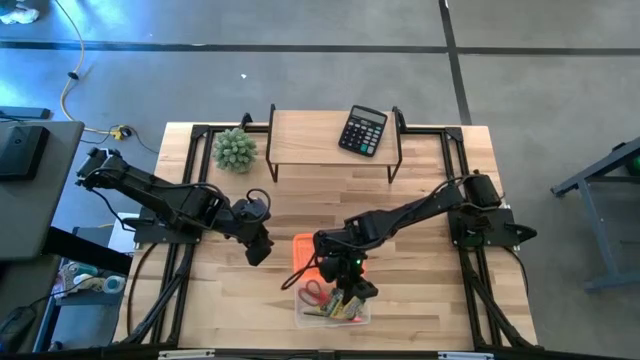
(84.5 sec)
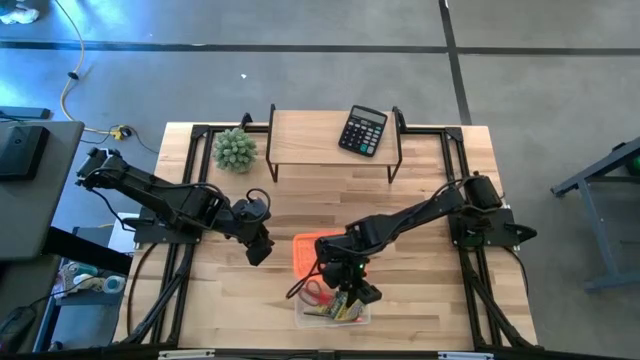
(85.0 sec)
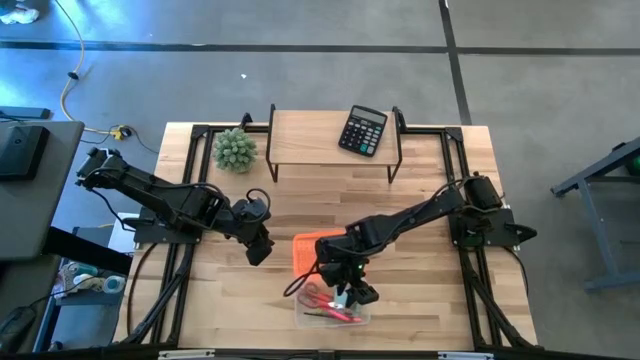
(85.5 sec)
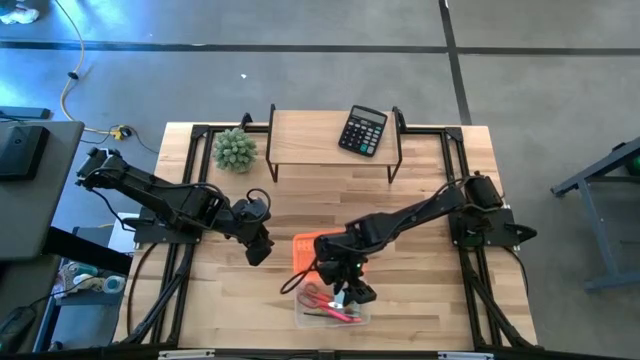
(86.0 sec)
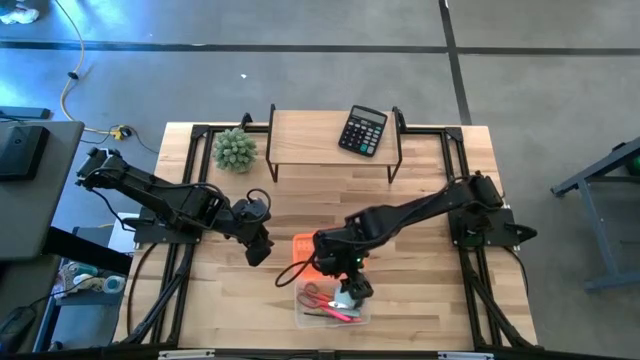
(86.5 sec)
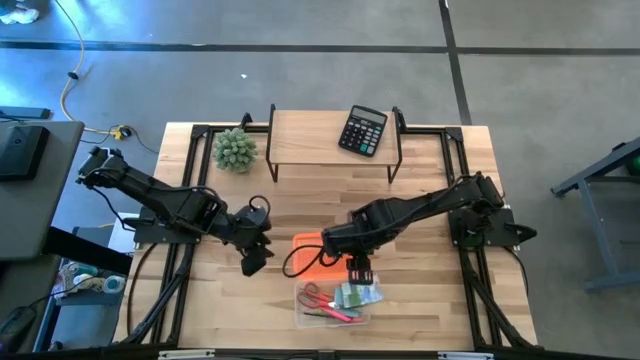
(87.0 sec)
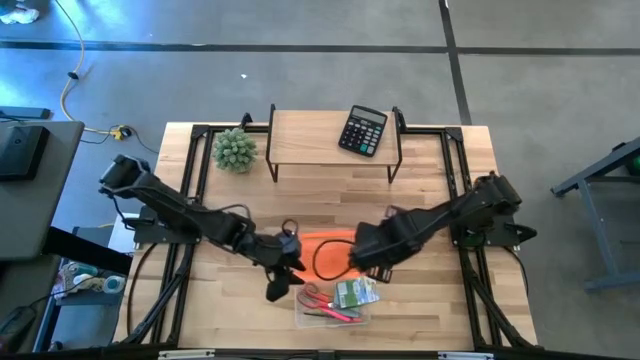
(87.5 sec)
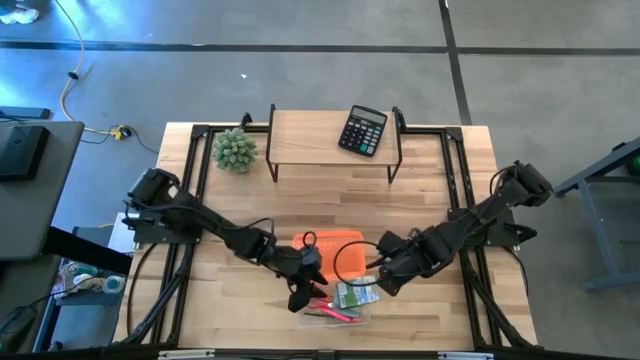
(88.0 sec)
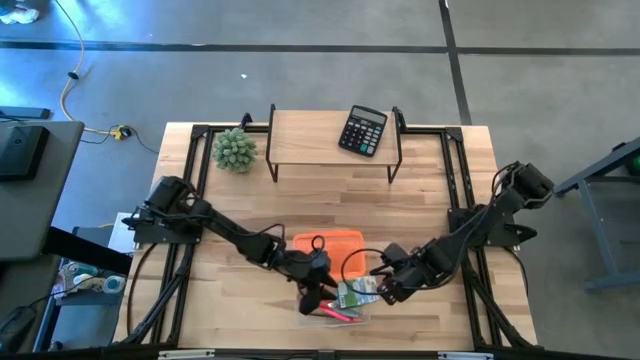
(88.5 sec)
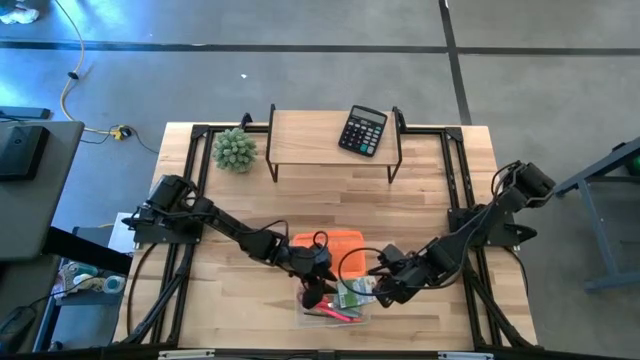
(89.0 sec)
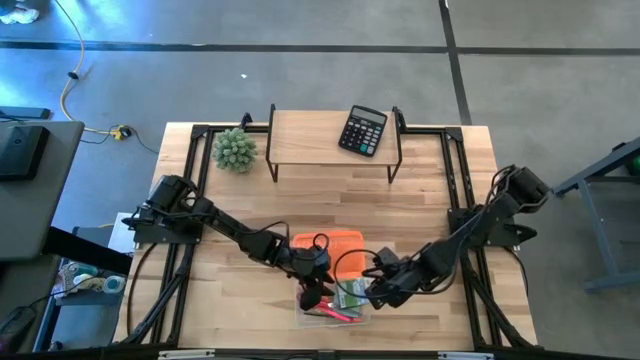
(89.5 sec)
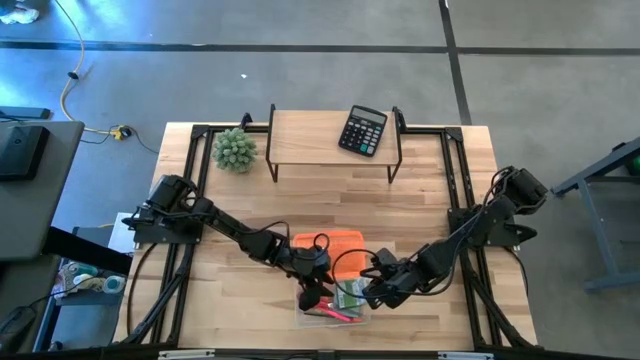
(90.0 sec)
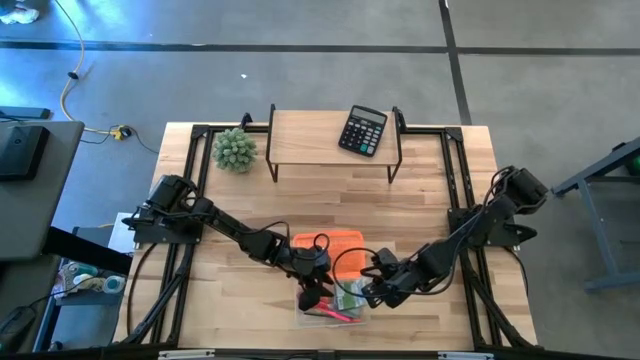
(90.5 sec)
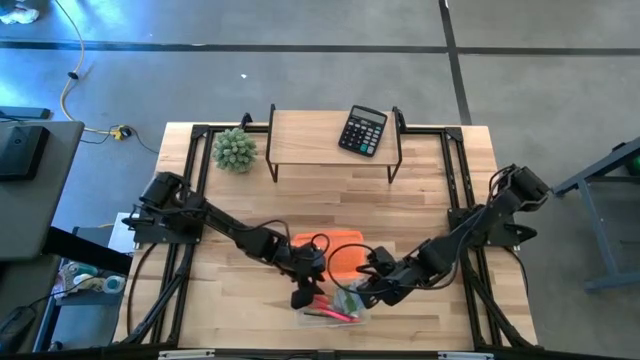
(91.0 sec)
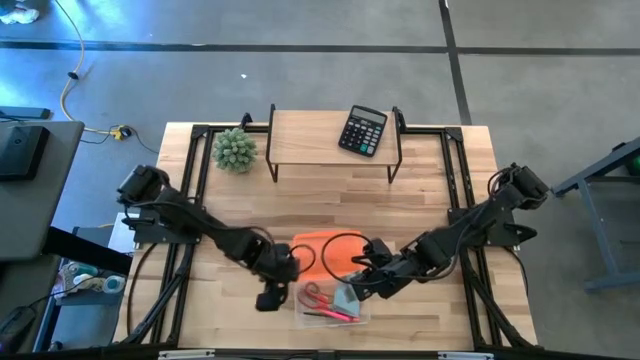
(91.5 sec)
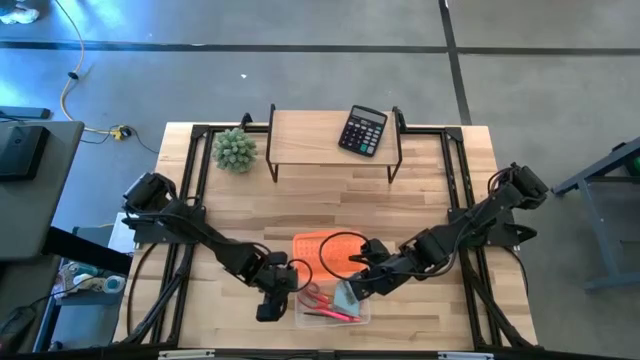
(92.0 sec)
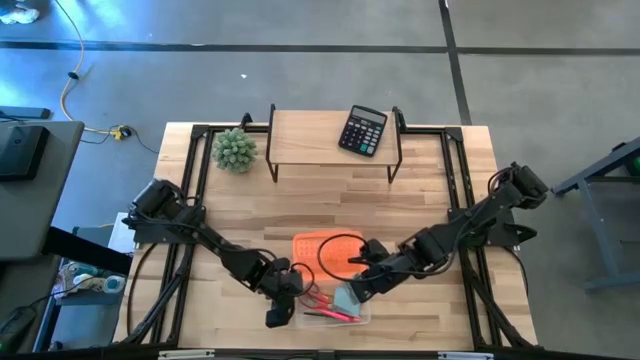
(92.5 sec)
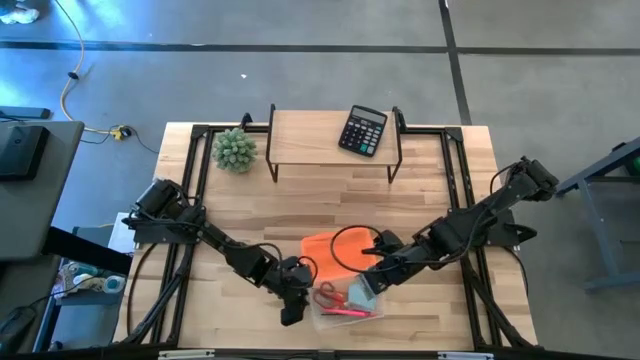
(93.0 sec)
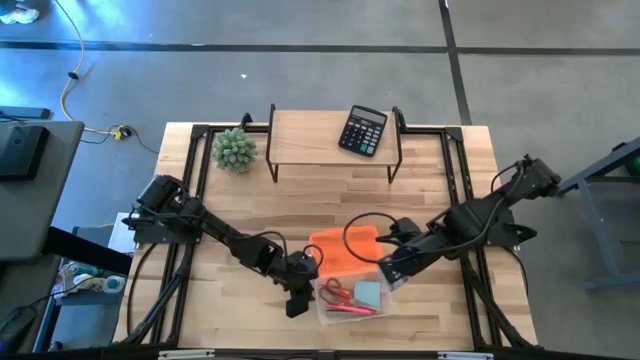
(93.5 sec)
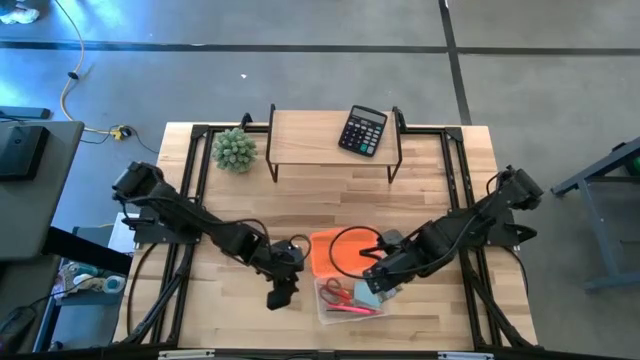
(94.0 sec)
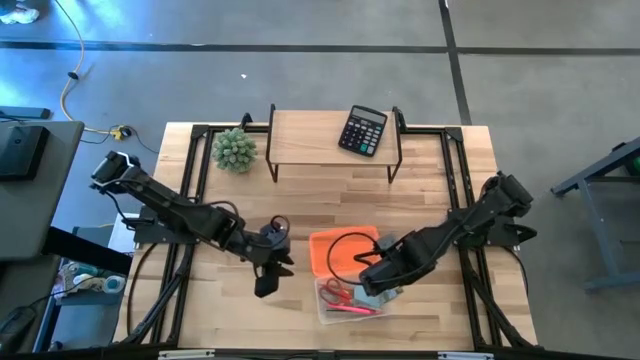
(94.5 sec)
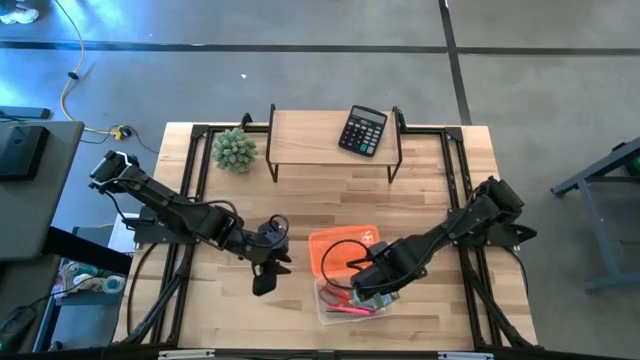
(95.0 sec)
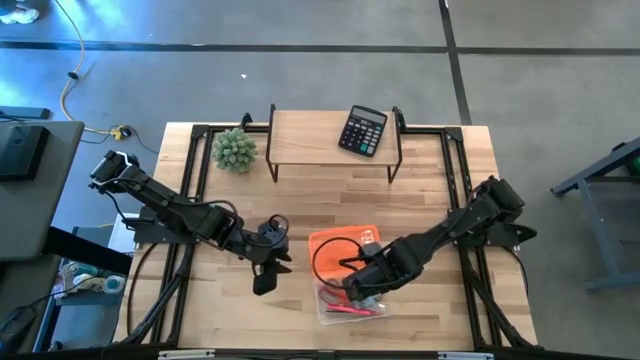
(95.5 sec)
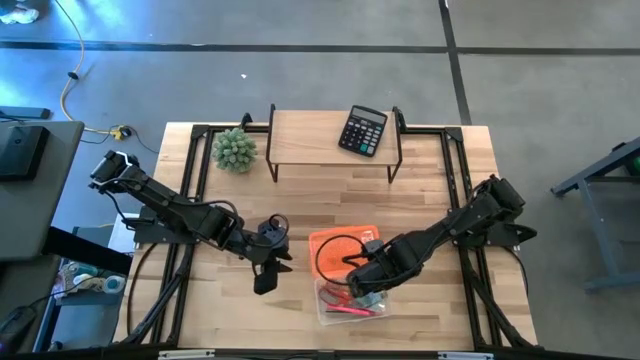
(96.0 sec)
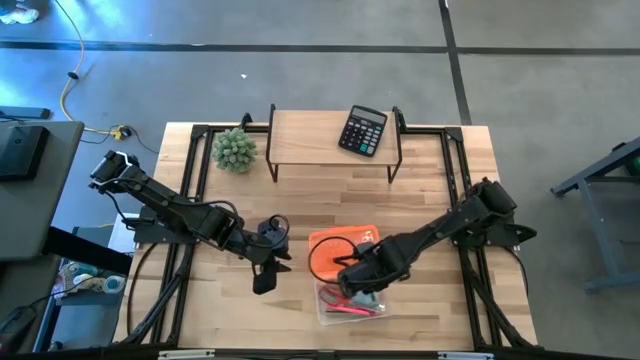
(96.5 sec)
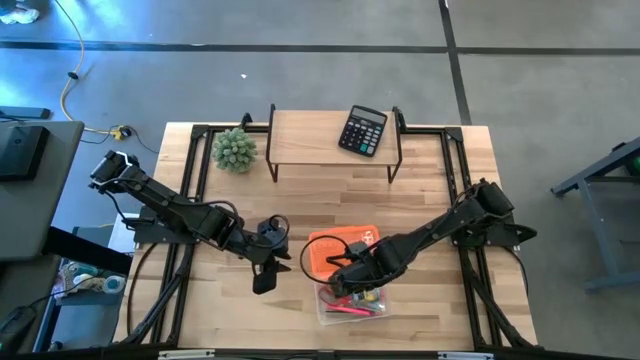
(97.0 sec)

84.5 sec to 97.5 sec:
Task: Pack school essentials
Put the crayon box into the orange supply box

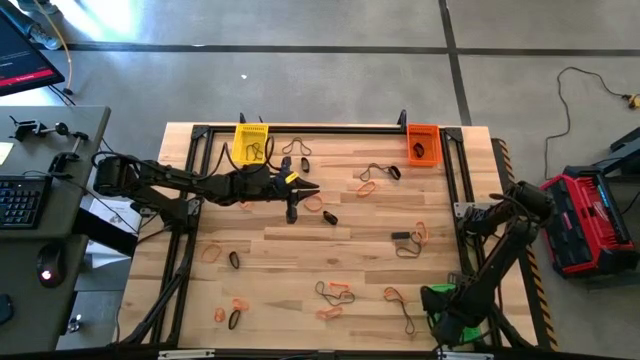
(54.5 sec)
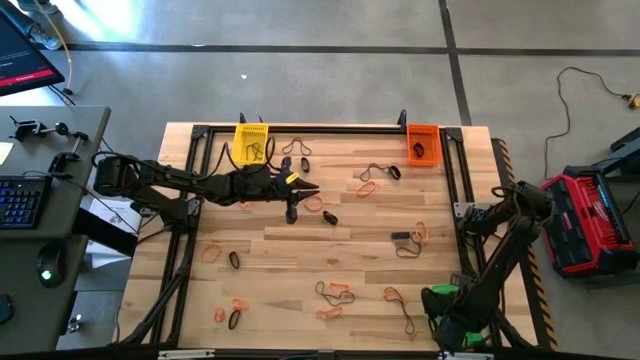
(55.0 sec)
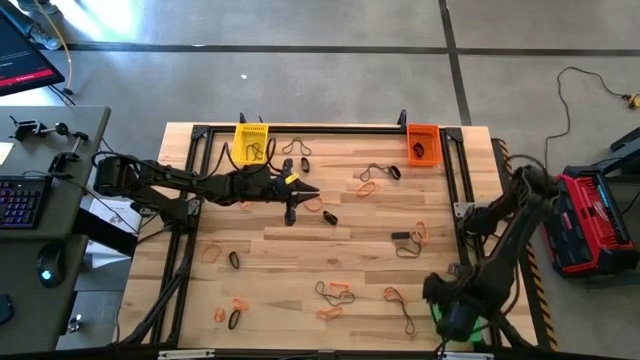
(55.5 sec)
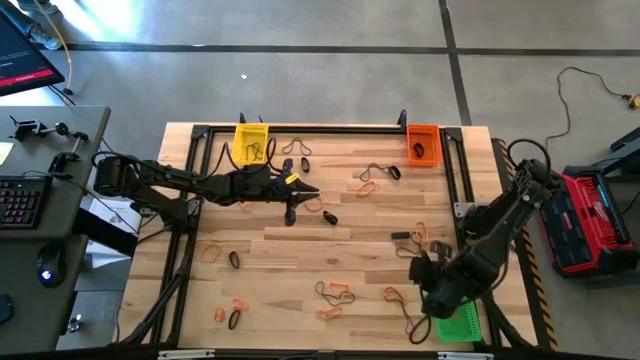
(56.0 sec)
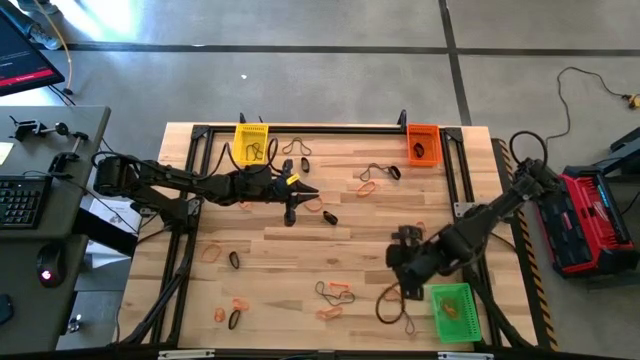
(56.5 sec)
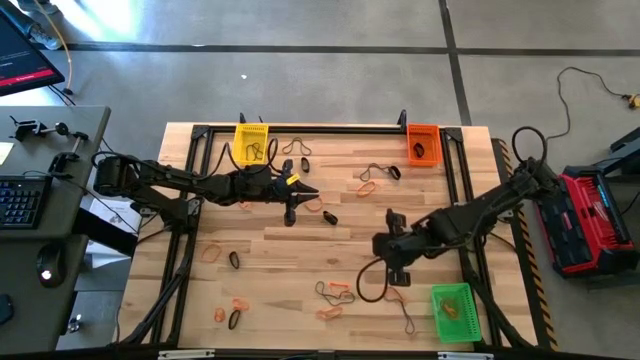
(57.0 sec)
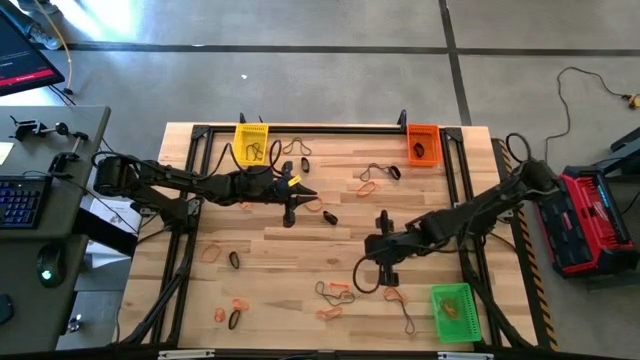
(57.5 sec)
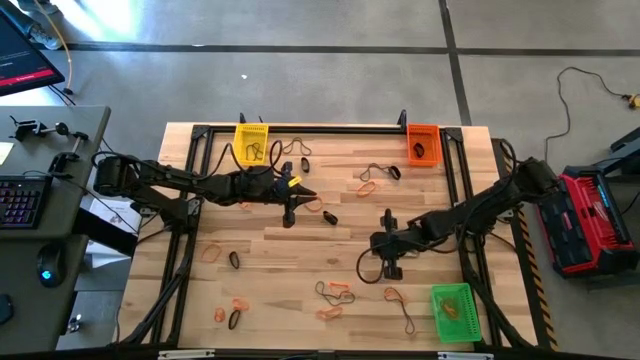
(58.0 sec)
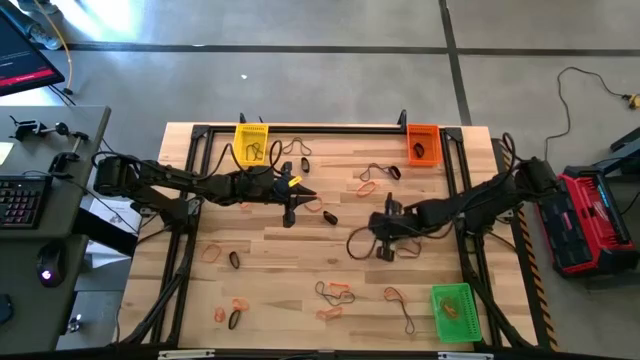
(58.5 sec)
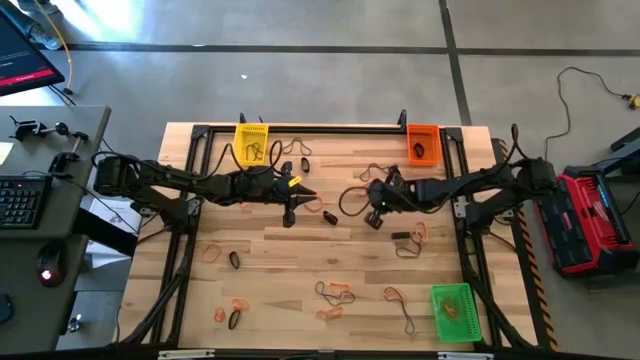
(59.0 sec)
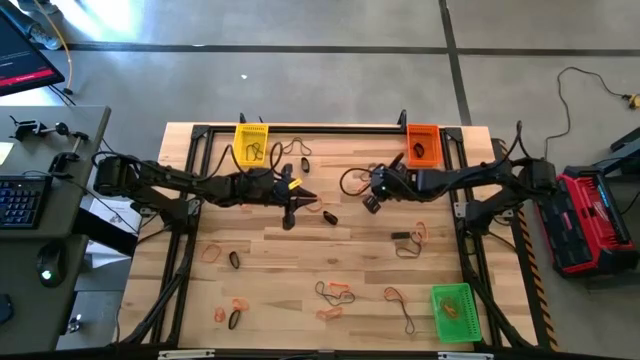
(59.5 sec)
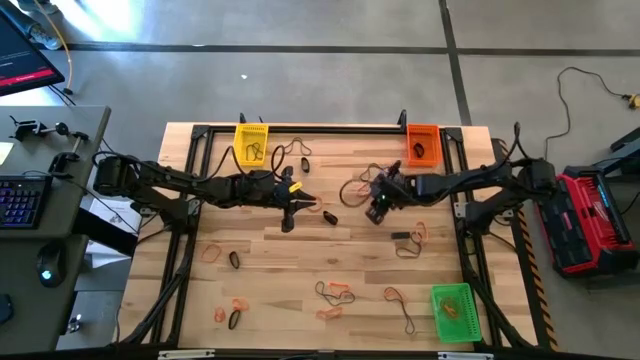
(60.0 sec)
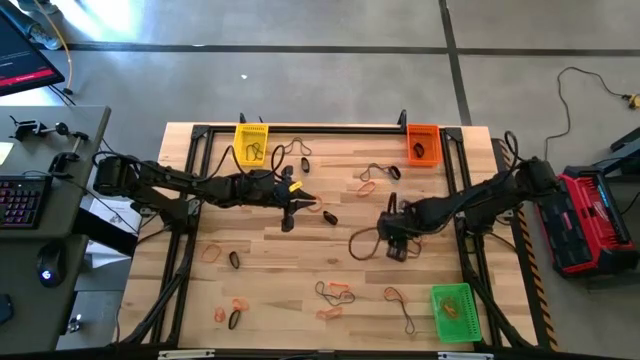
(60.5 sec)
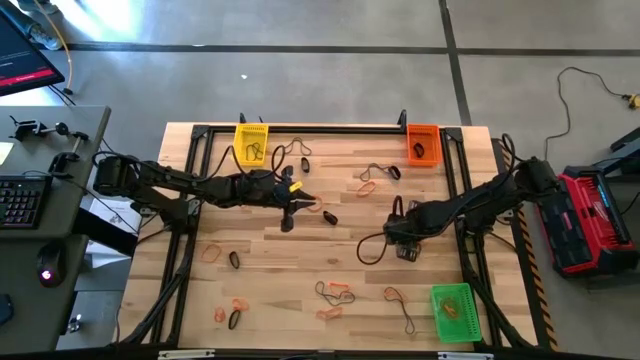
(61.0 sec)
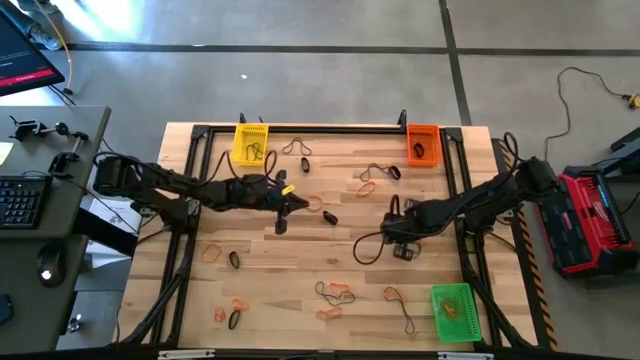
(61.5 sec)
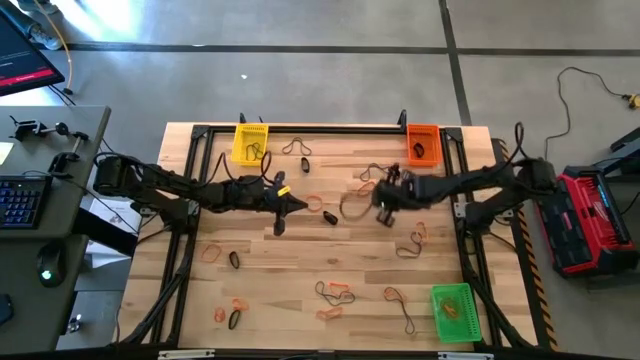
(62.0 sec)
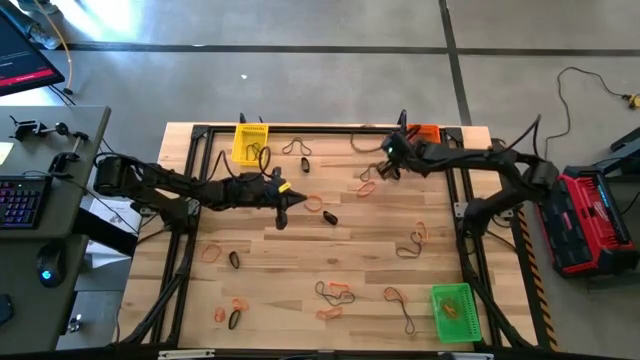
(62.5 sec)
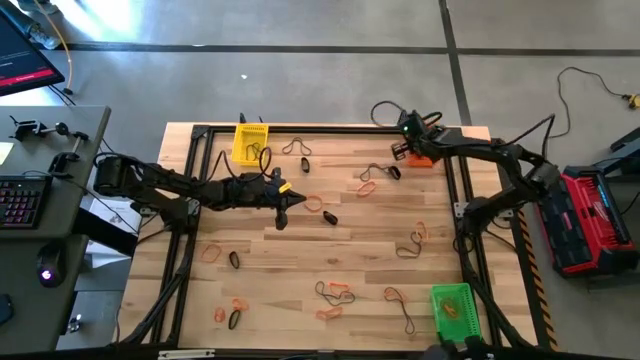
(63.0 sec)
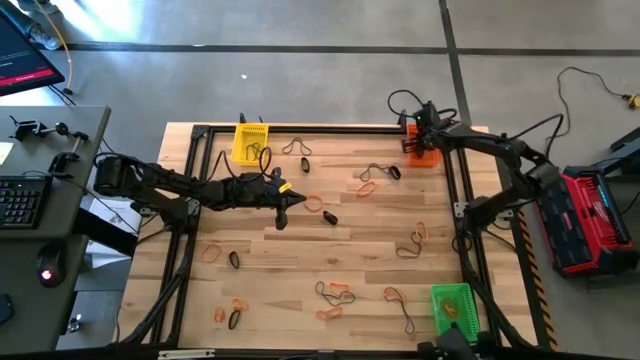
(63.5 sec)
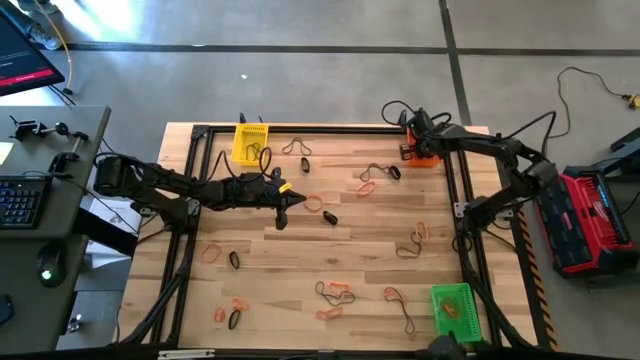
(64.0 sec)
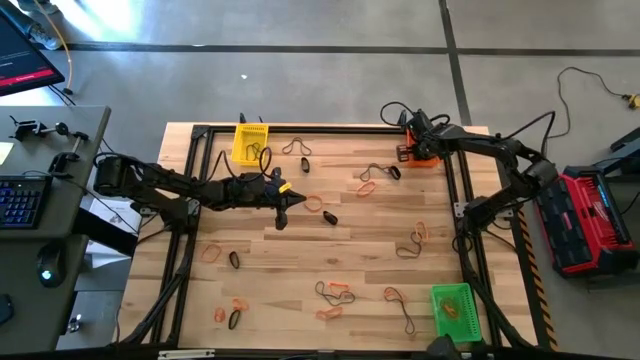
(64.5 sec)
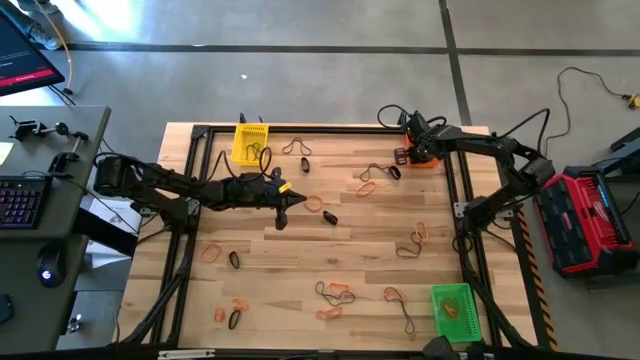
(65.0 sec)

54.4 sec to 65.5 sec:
Task: Sort rubber bands into baskets
Put the black rubber band into the orange bin
